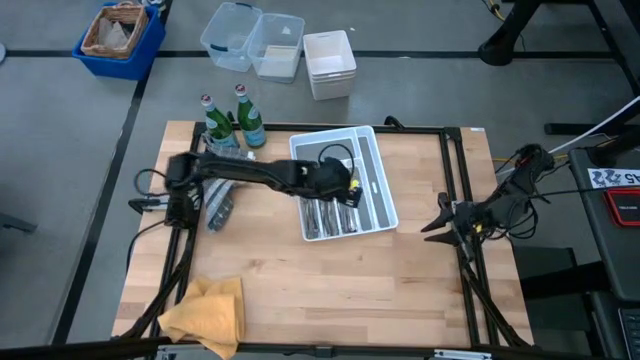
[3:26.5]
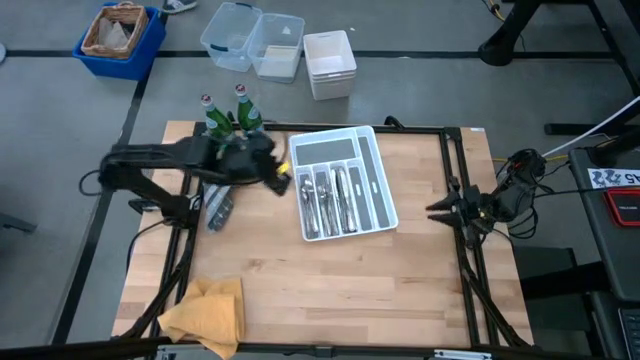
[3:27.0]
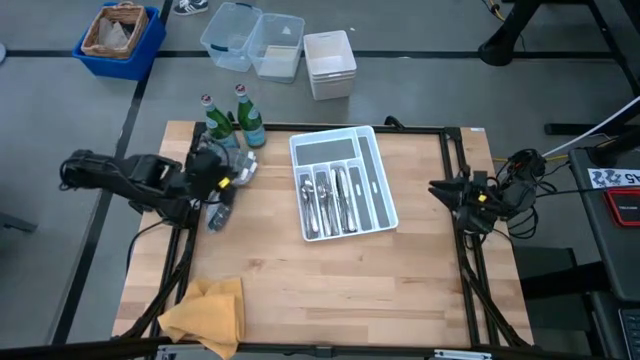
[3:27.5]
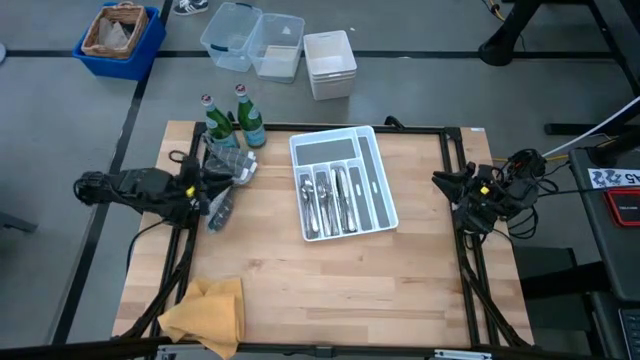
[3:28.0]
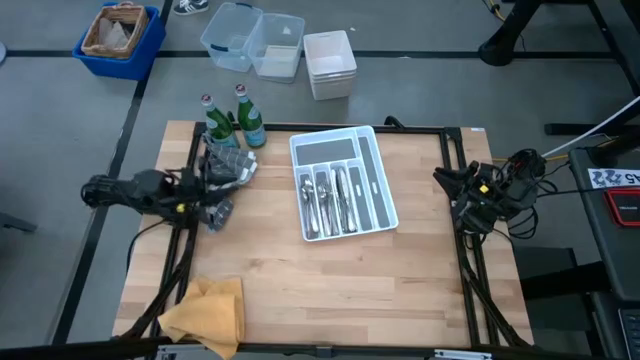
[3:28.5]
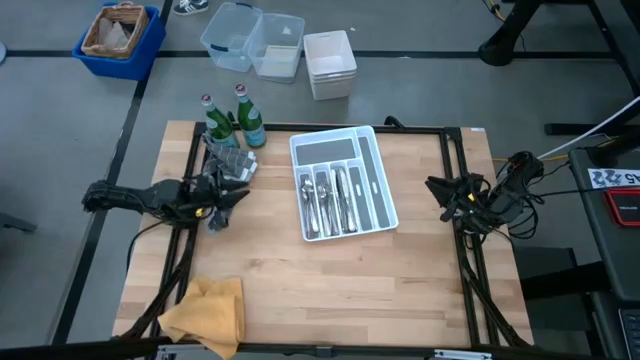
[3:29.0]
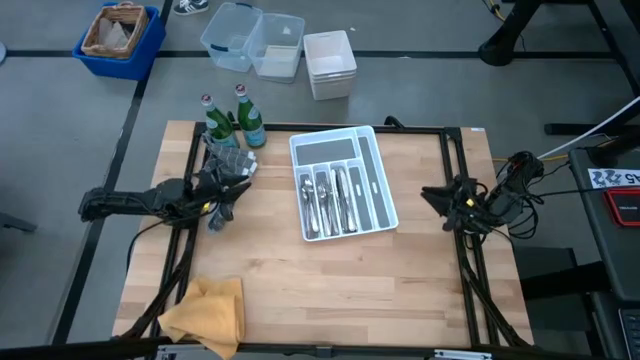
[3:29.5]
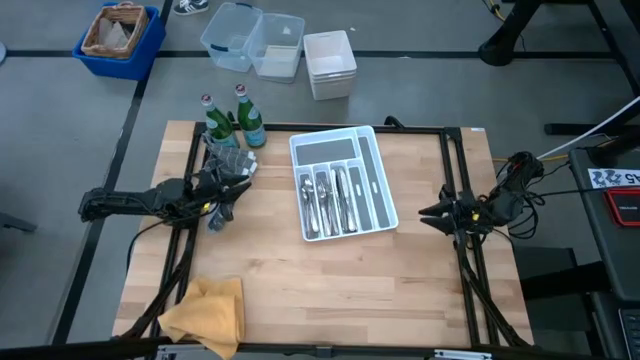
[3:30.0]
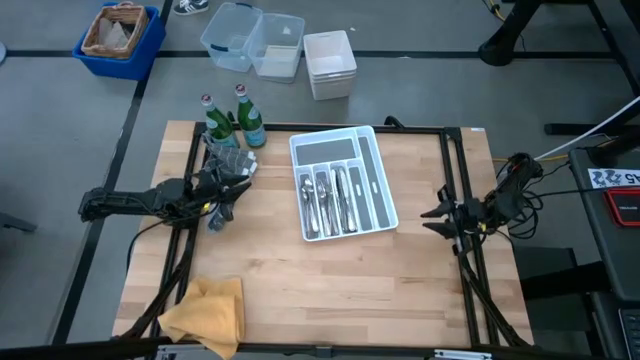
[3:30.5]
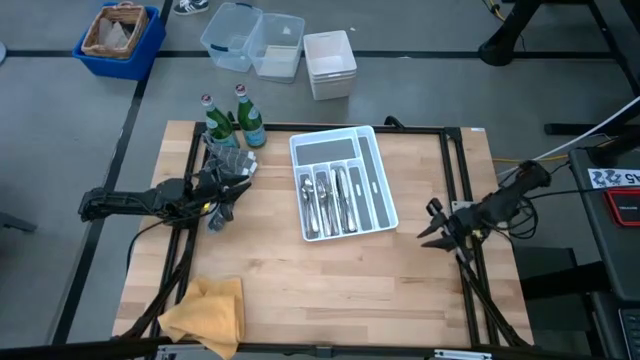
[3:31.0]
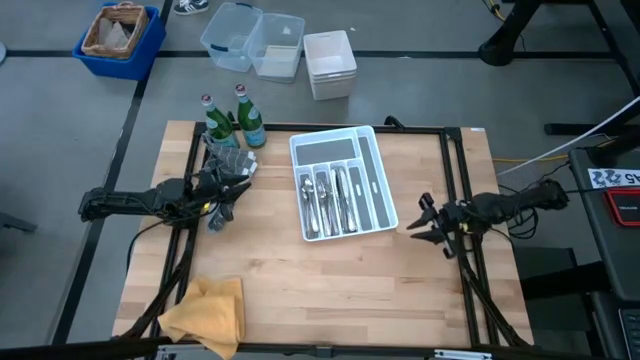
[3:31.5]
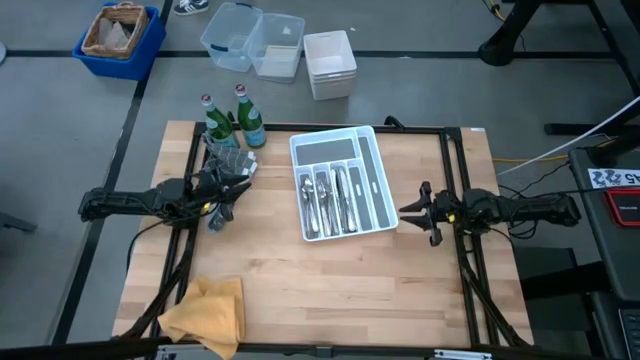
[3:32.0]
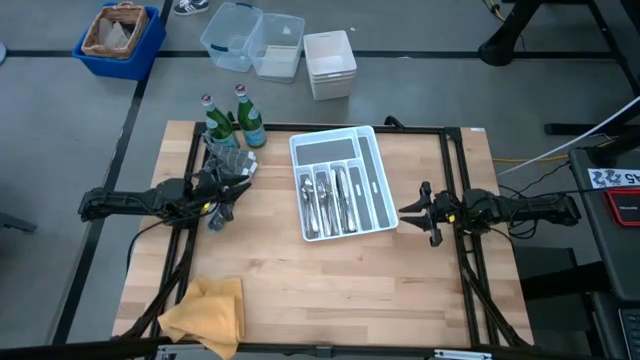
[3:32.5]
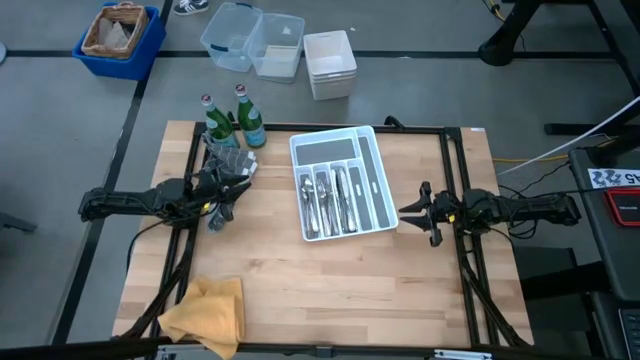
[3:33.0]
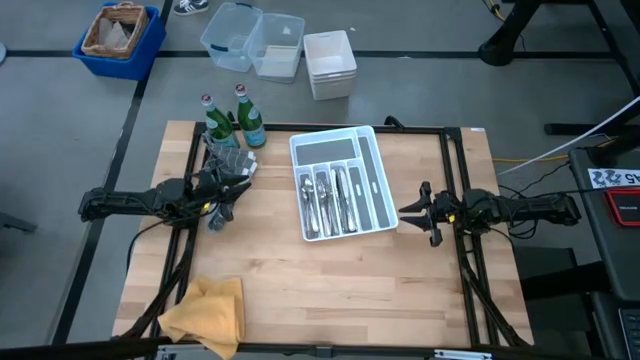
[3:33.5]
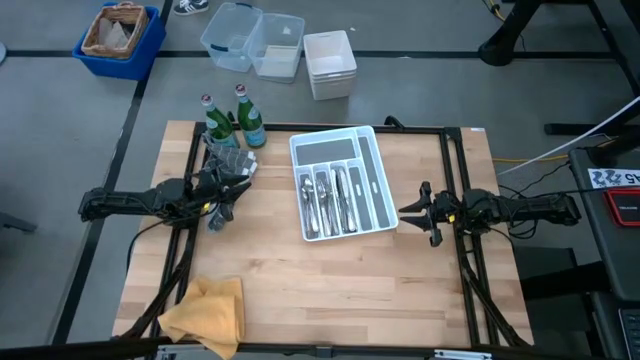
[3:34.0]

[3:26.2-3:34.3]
Task: Sort silverware
Return to Home Position

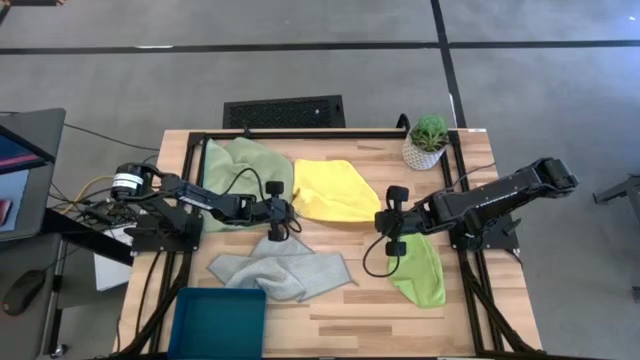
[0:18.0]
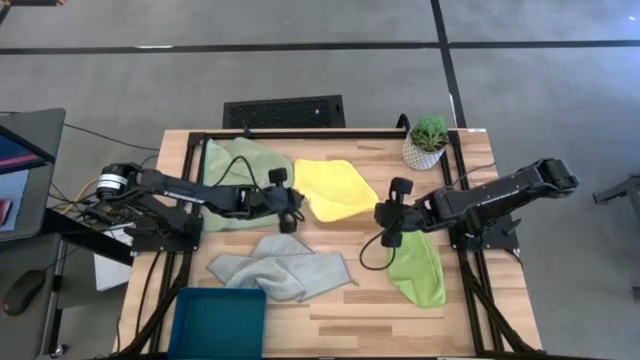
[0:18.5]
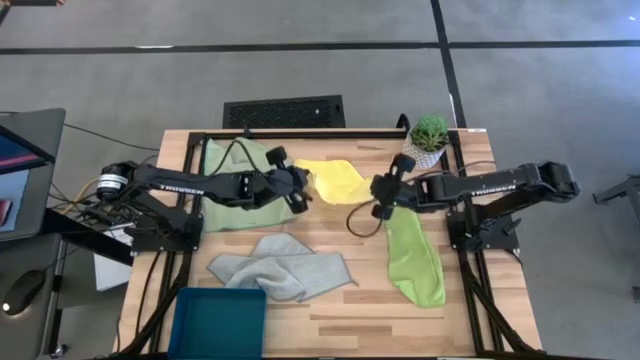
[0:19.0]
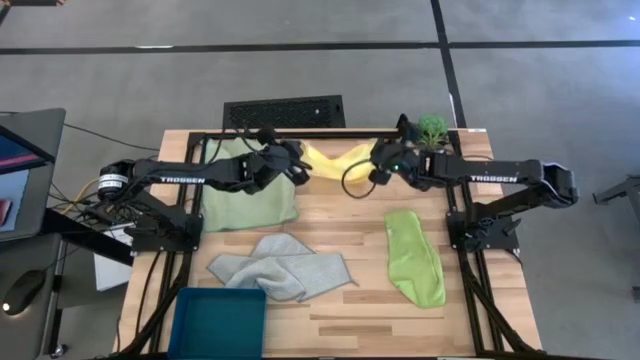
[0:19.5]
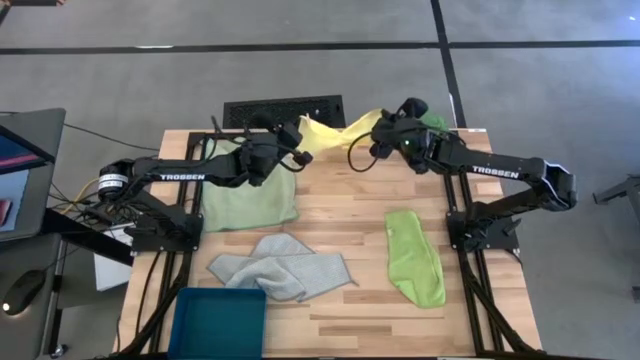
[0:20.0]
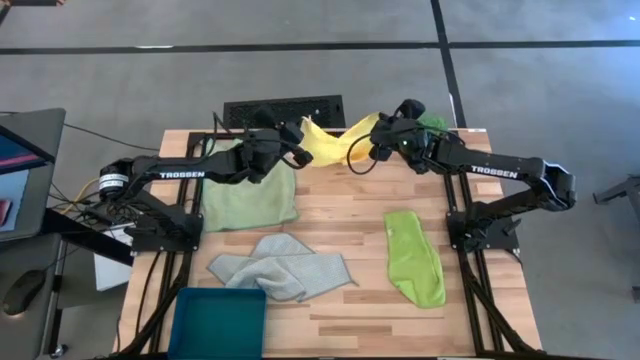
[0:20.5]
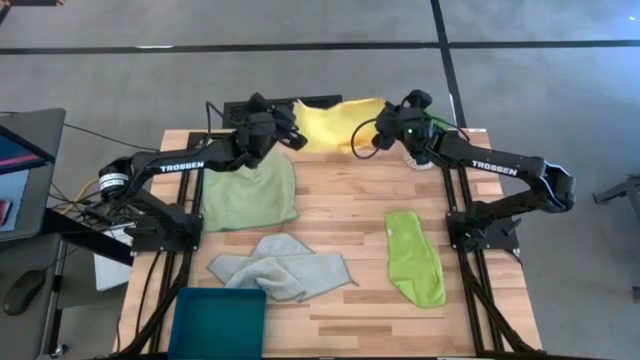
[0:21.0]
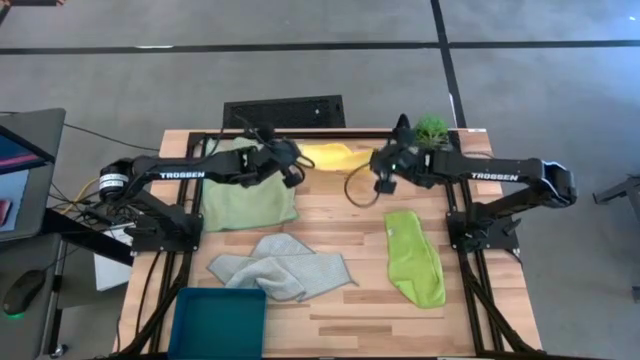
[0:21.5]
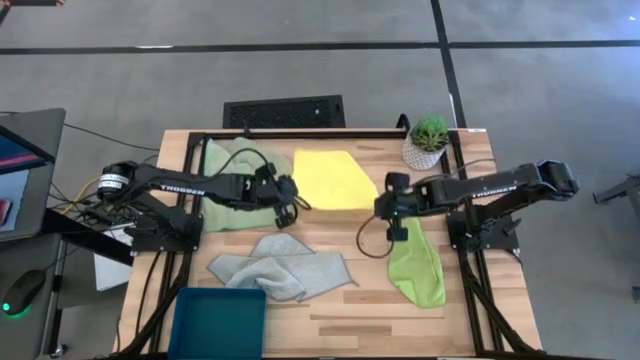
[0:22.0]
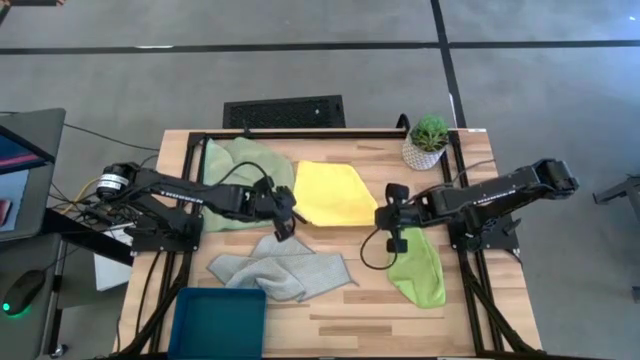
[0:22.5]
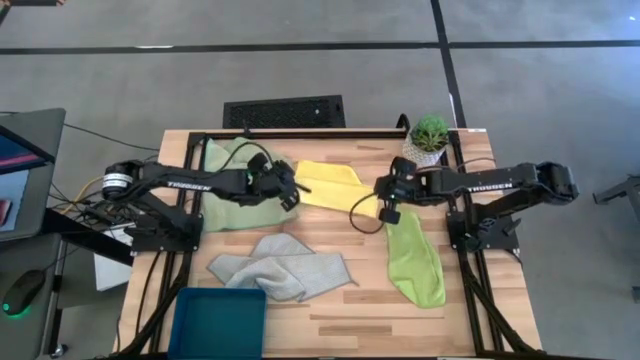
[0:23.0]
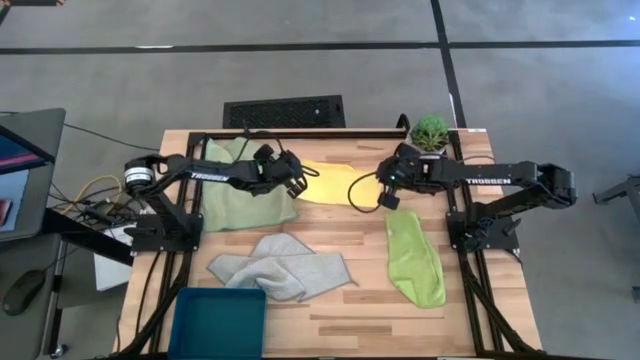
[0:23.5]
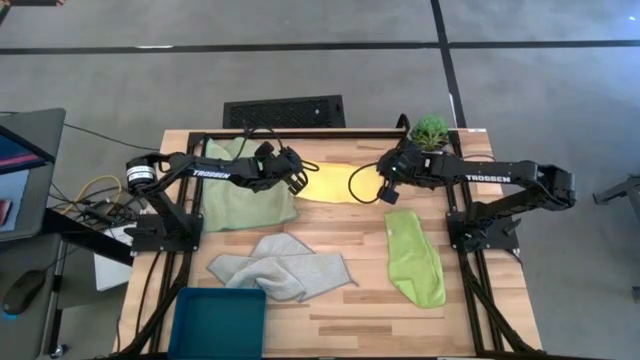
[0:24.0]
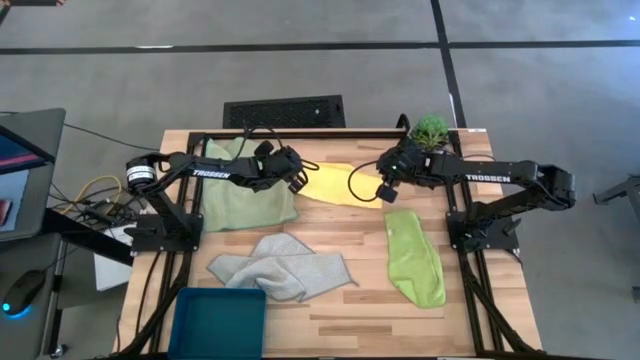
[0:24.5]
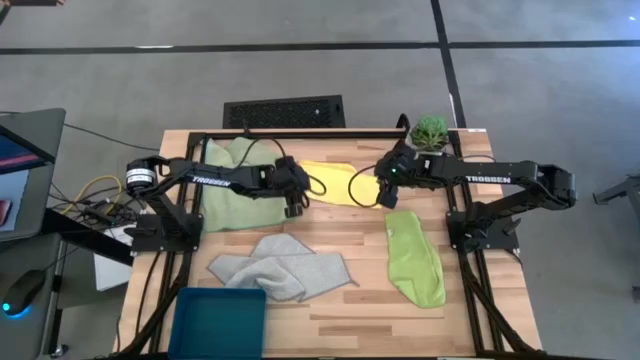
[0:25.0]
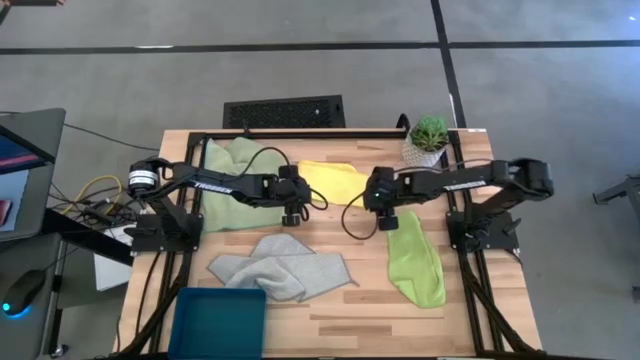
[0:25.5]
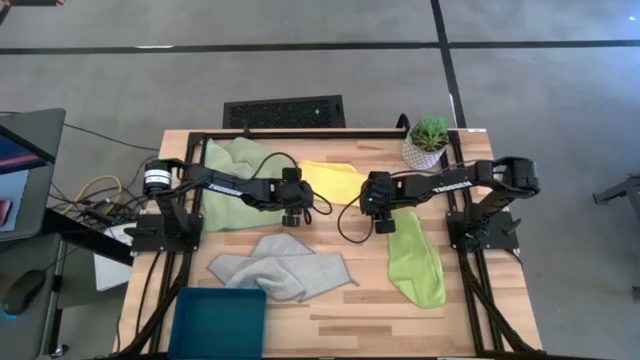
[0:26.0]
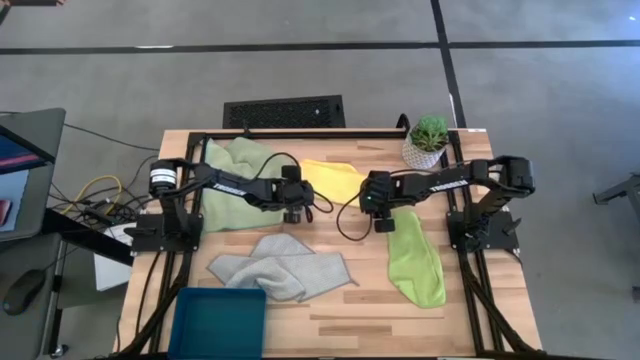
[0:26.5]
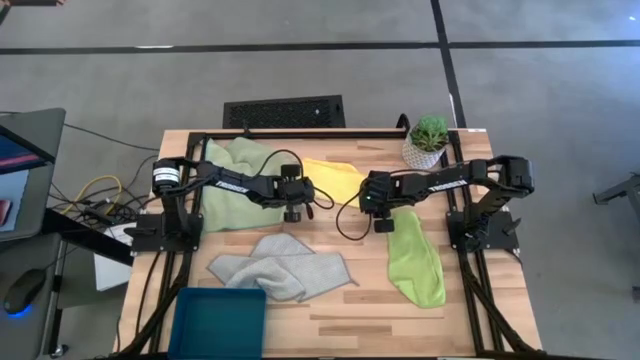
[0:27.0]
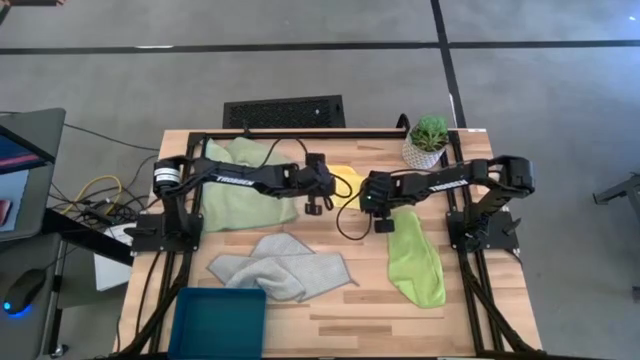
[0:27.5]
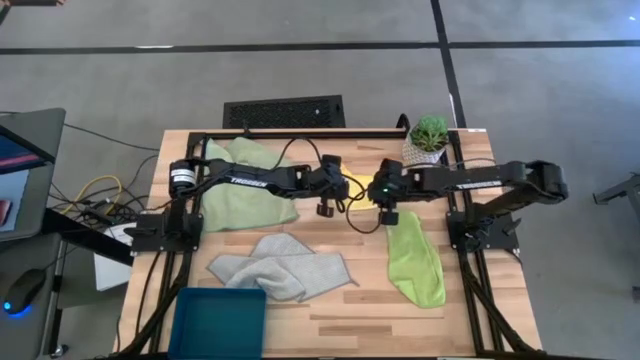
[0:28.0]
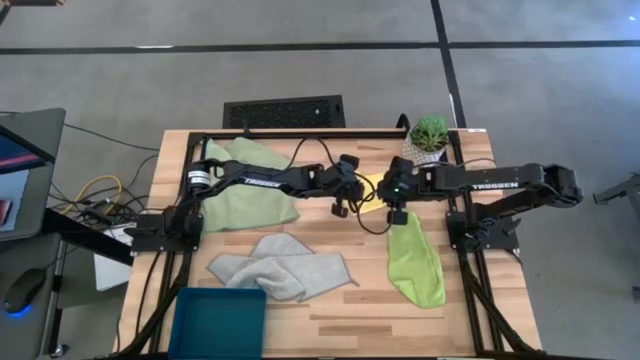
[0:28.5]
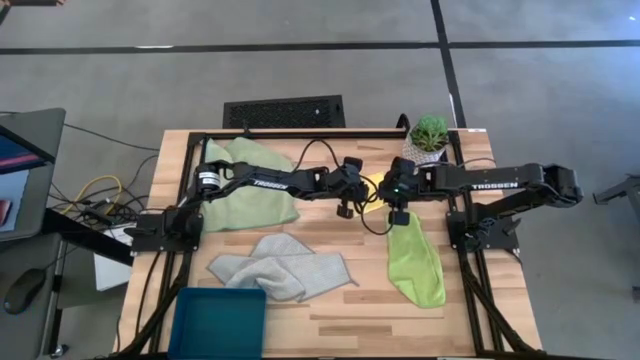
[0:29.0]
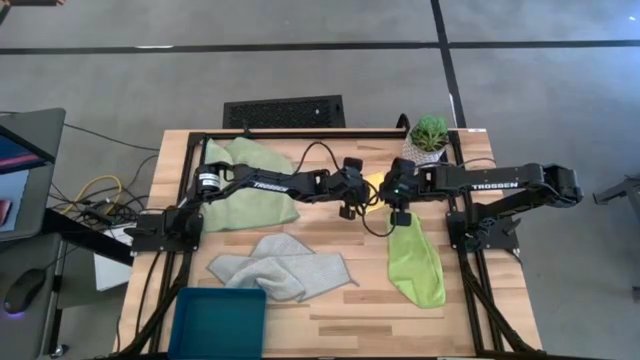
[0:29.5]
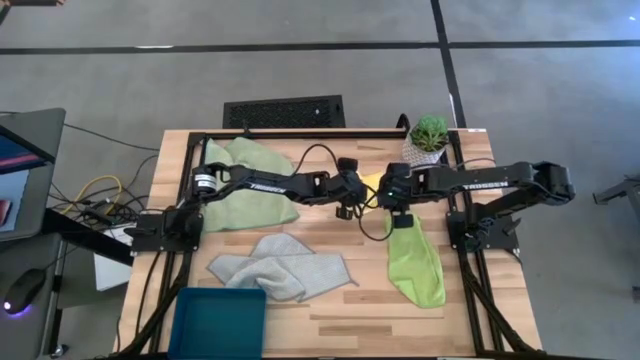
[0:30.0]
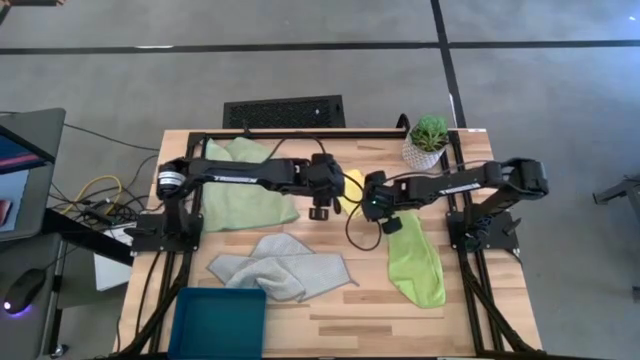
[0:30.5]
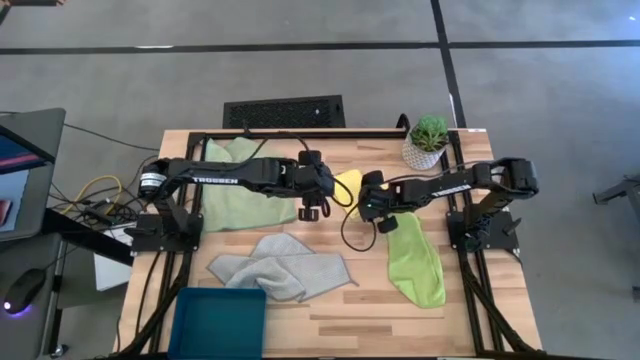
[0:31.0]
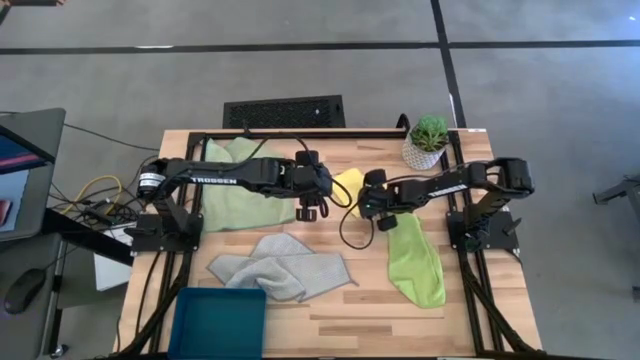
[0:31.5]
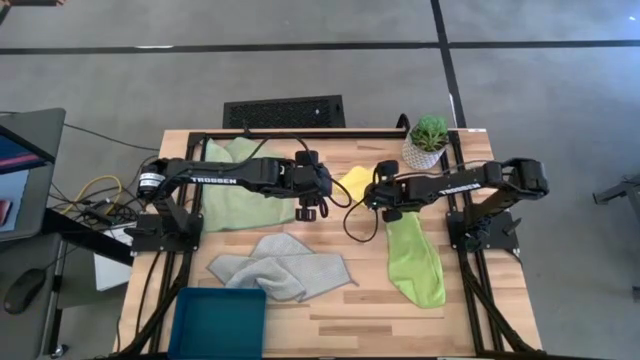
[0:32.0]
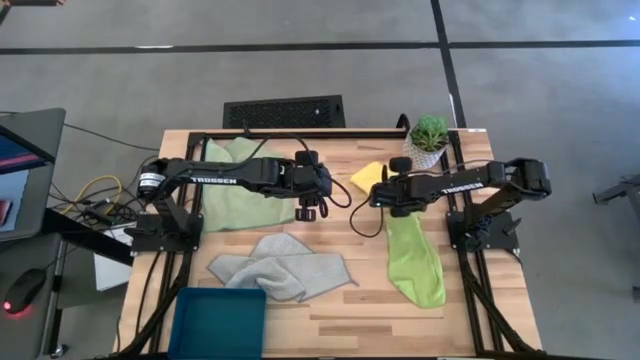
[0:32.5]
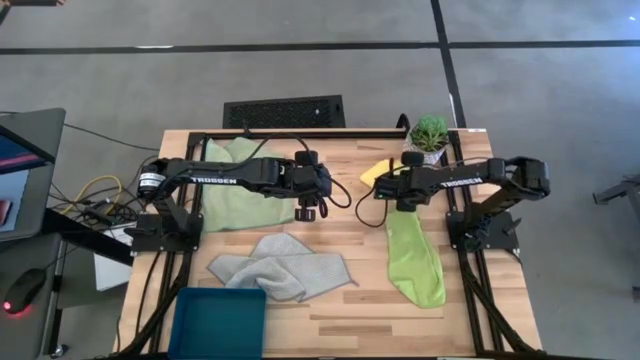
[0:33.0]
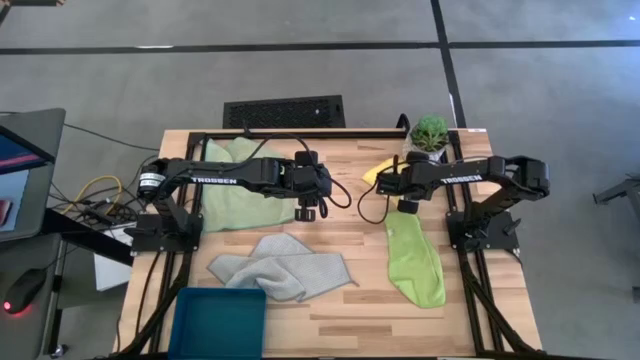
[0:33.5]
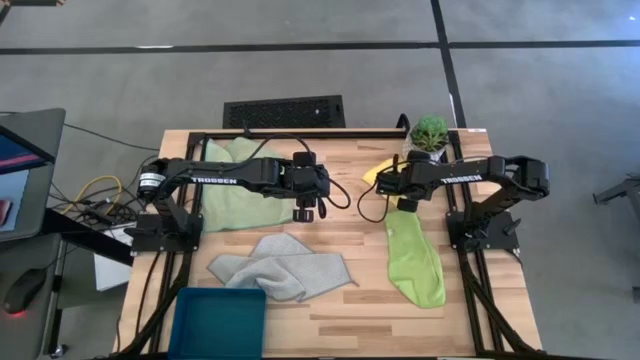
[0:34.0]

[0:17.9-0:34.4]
Task: Fold microfiber towels
Fold the yellow microfiber cloth
